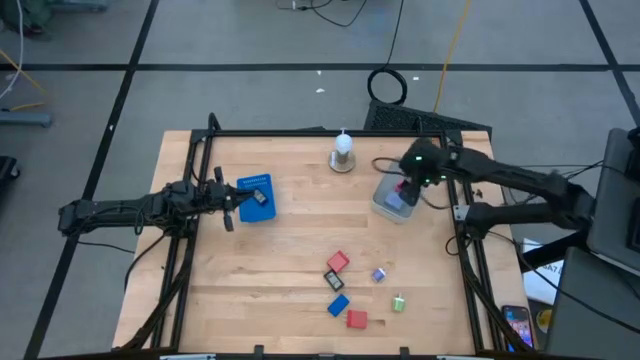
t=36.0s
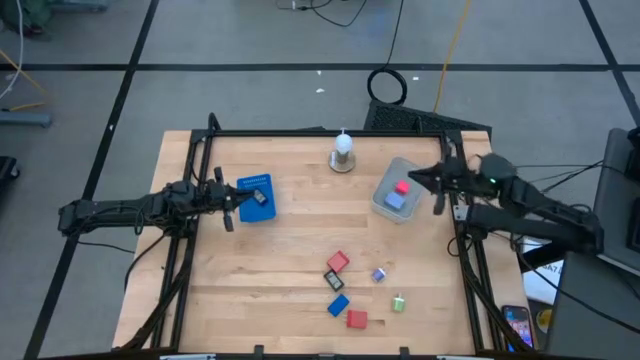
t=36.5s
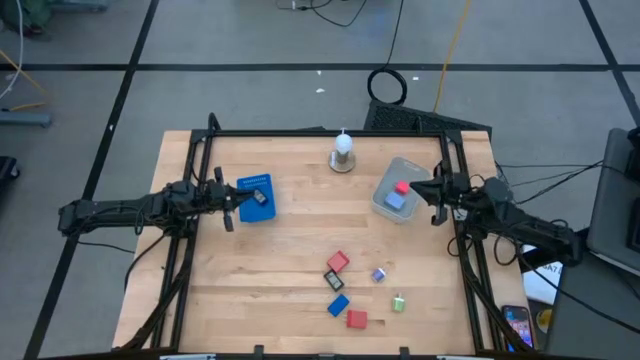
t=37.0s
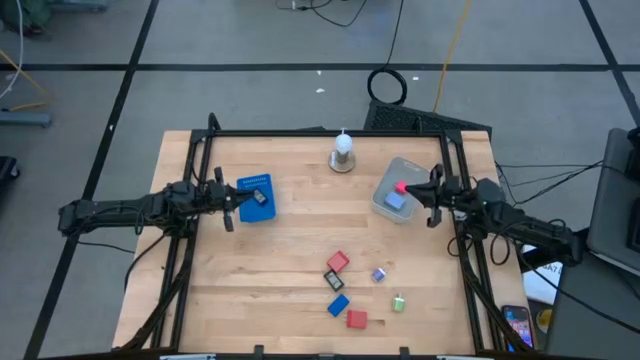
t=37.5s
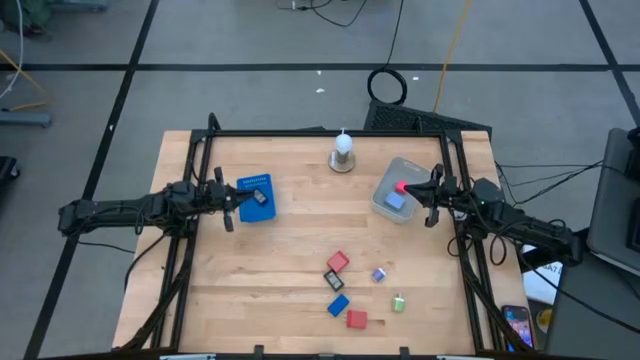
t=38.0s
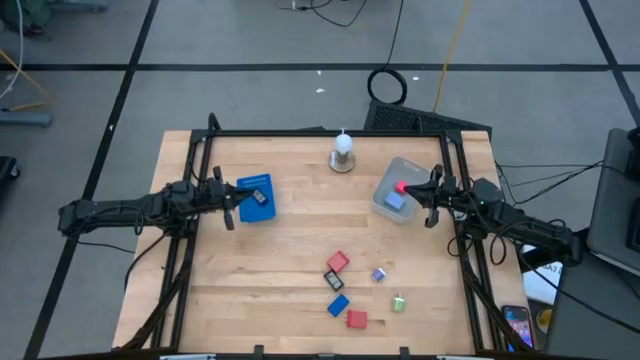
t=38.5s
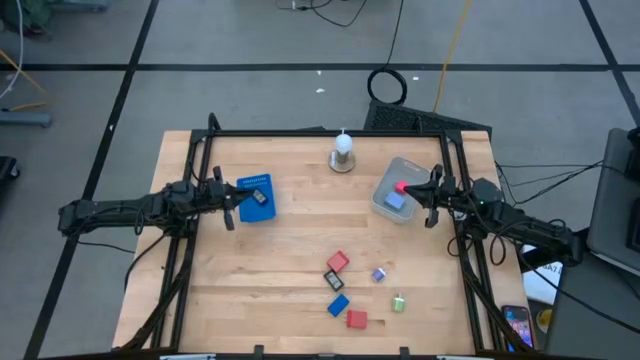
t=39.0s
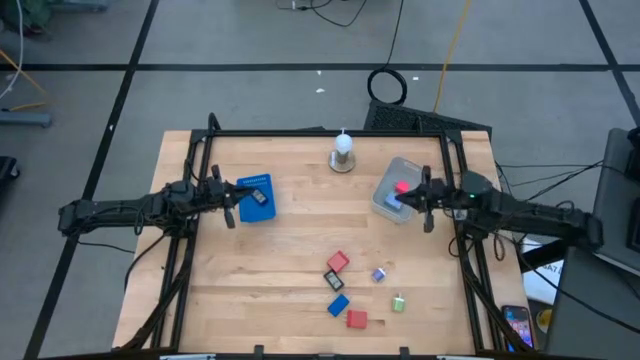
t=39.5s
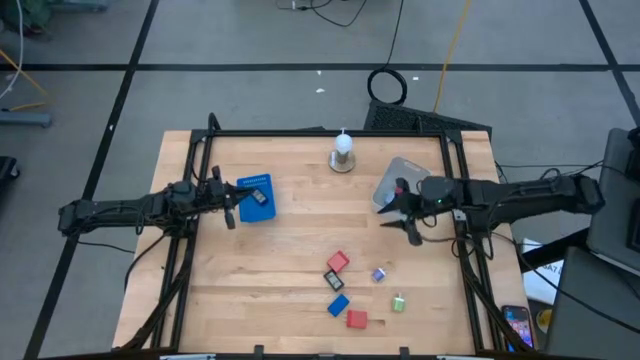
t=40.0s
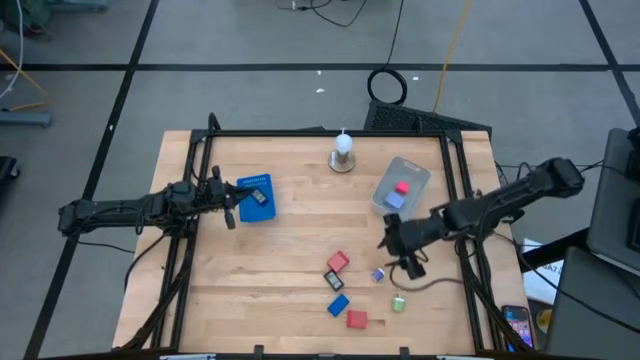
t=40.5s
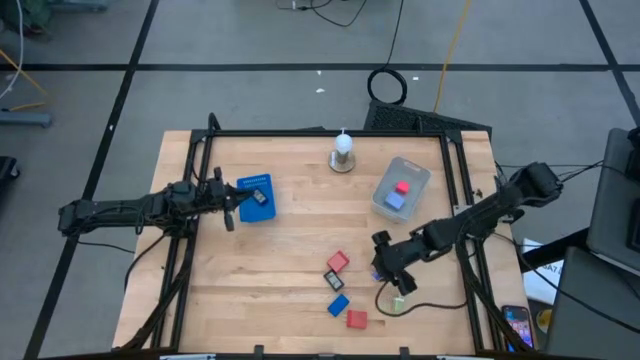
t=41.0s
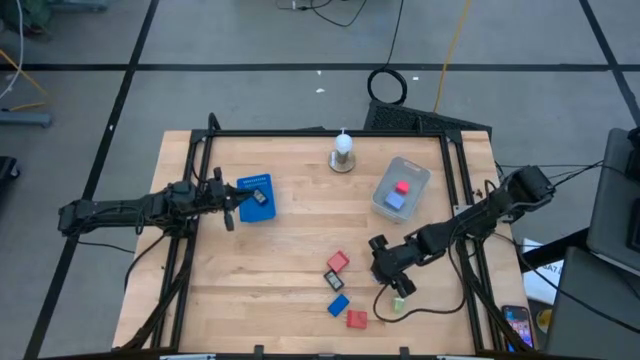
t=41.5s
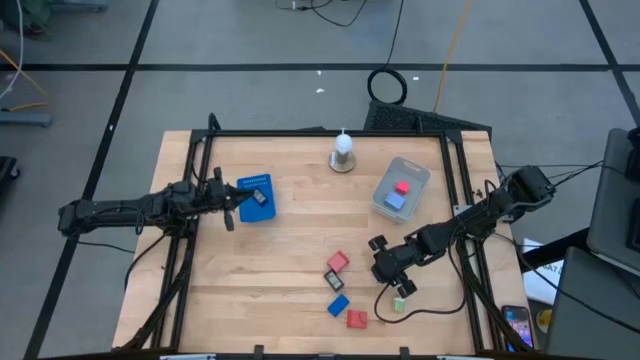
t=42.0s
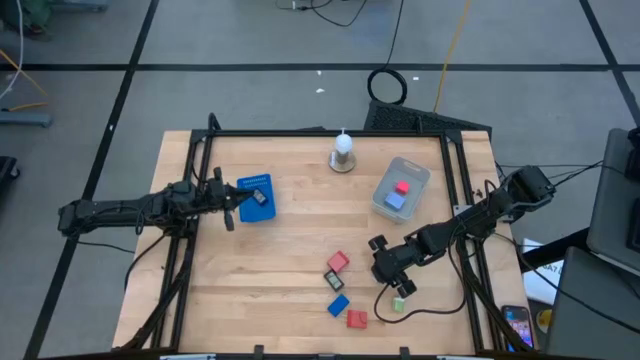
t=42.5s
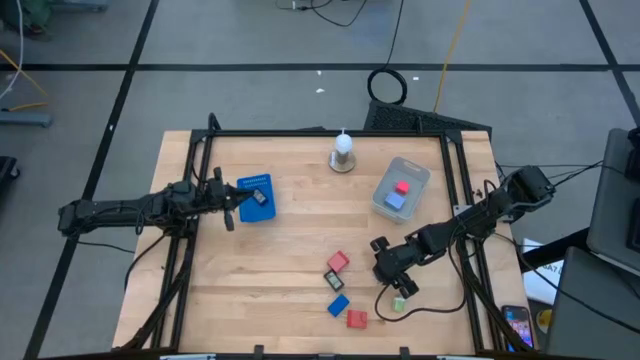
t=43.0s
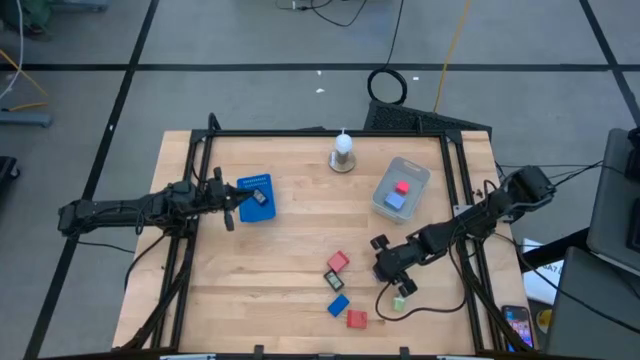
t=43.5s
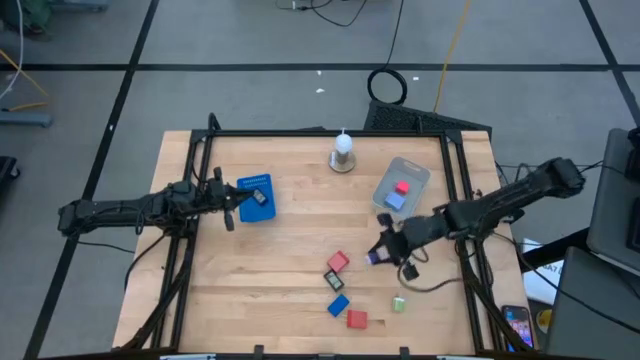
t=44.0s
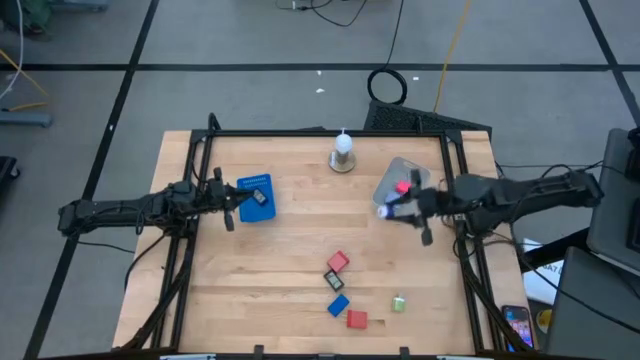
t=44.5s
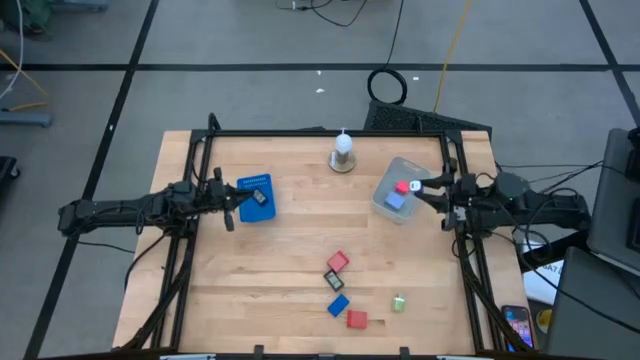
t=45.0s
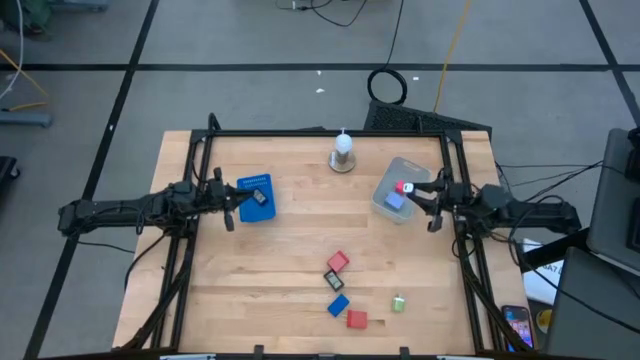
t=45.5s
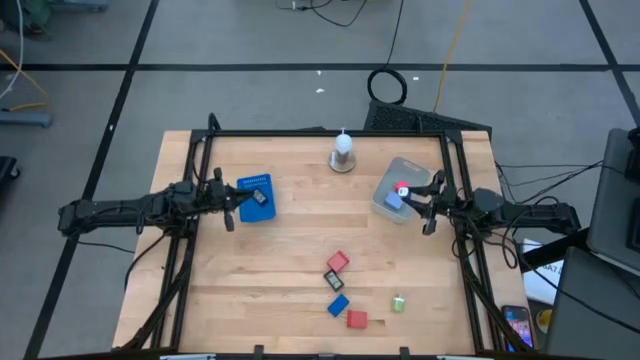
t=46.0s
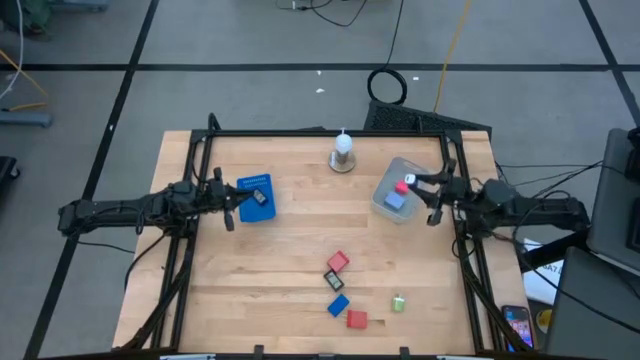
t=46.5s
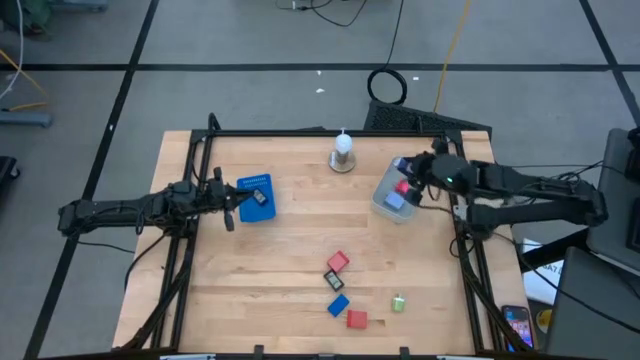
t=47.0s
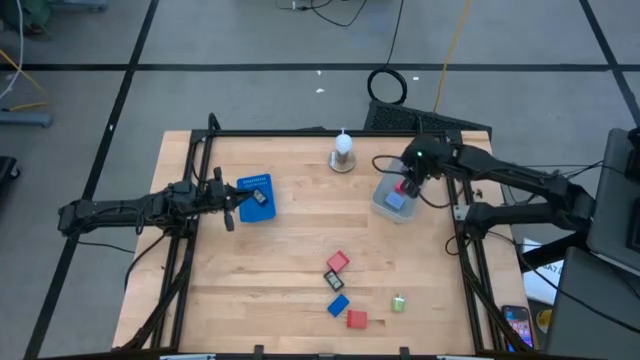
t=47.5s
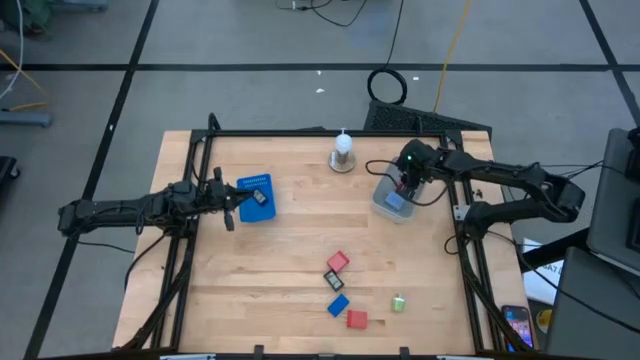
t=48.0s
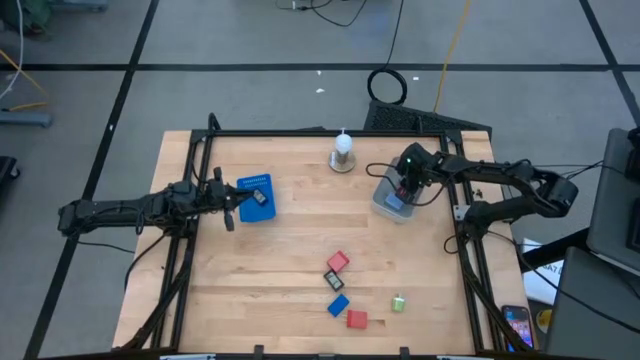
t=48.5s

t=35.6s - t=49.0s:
Task: Pick & Place Office items
Put the purple charger adapter into the gray bin

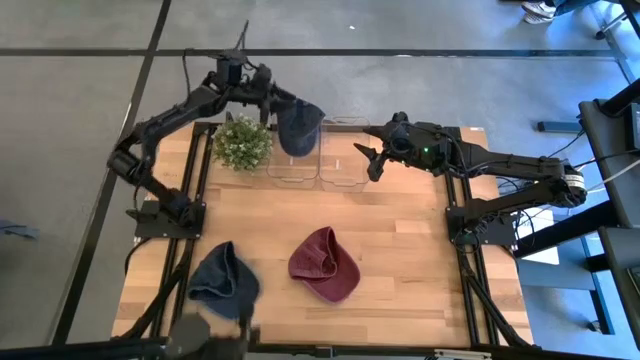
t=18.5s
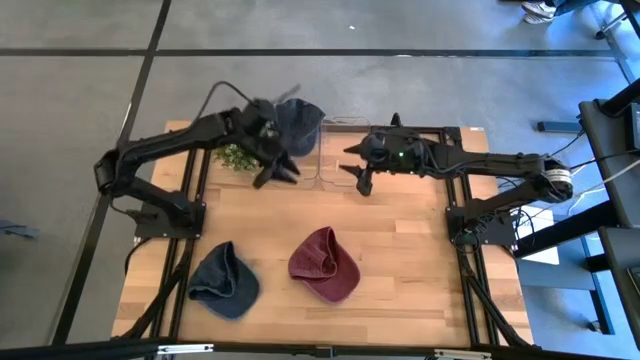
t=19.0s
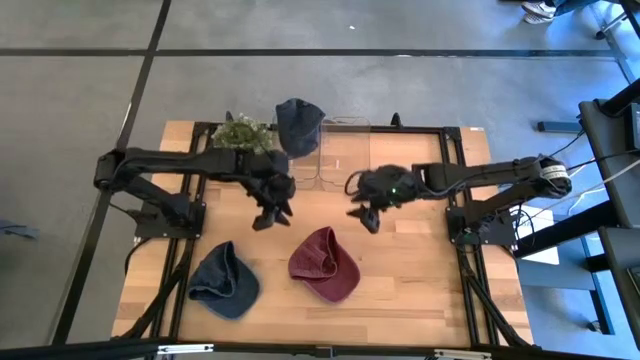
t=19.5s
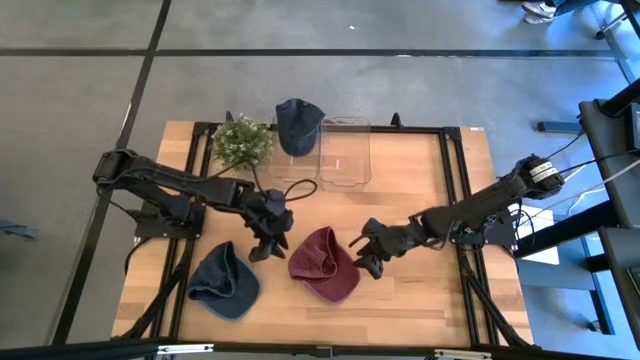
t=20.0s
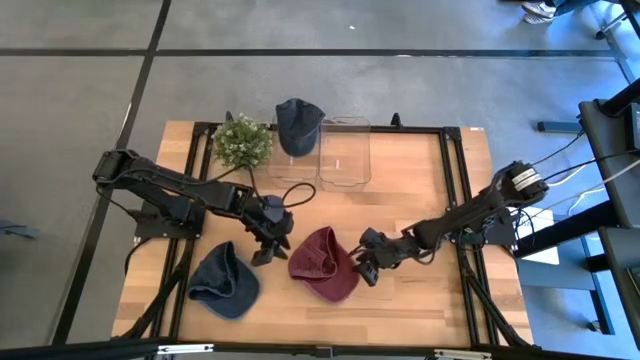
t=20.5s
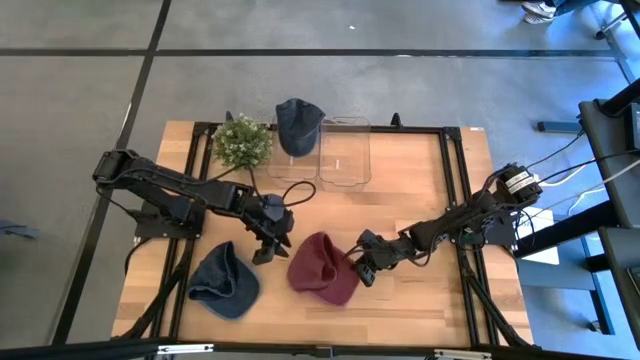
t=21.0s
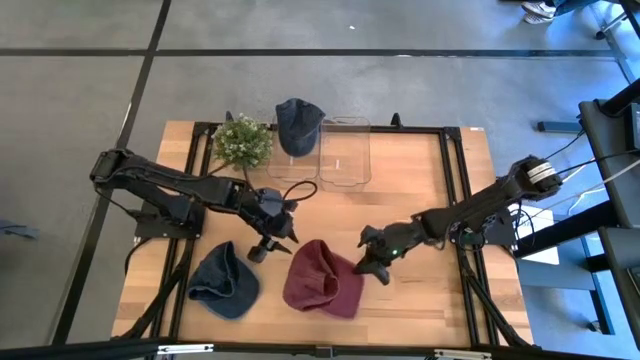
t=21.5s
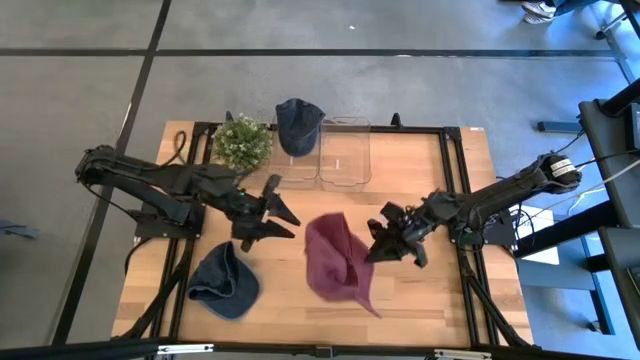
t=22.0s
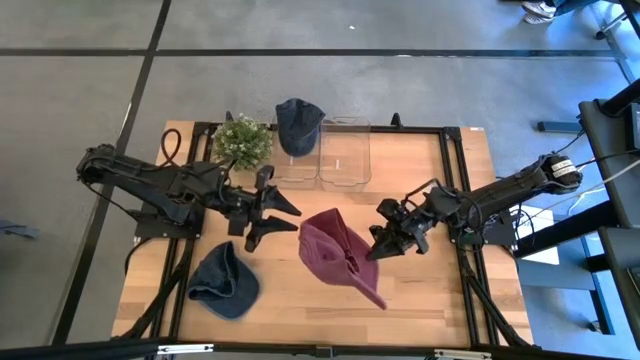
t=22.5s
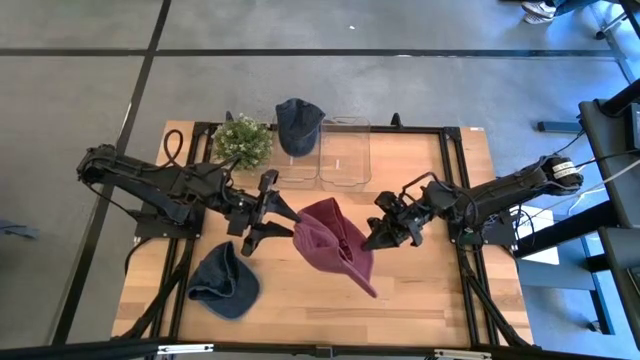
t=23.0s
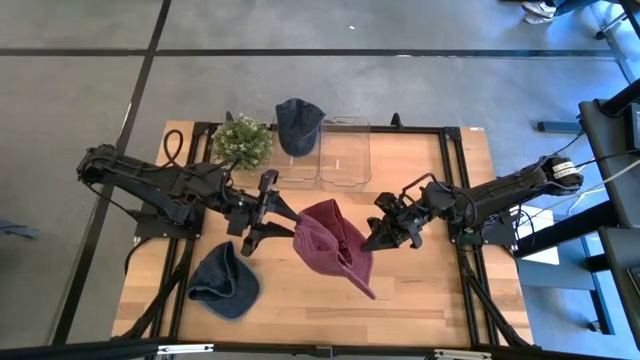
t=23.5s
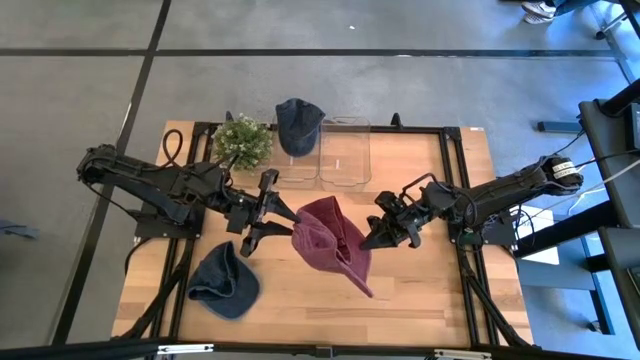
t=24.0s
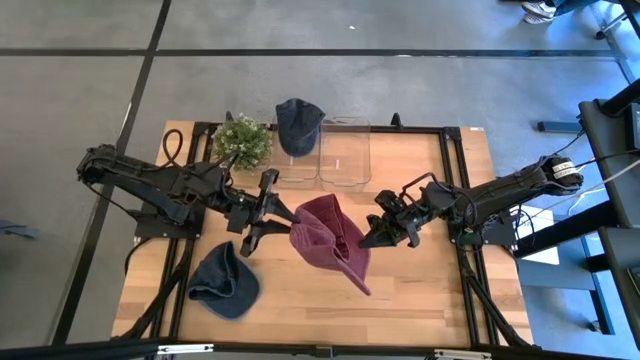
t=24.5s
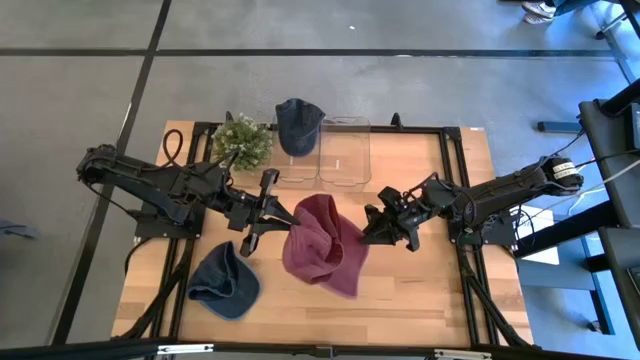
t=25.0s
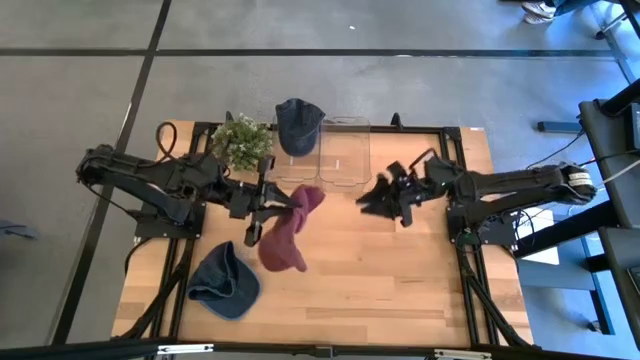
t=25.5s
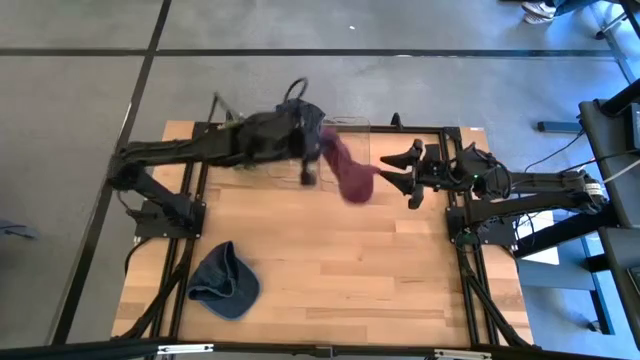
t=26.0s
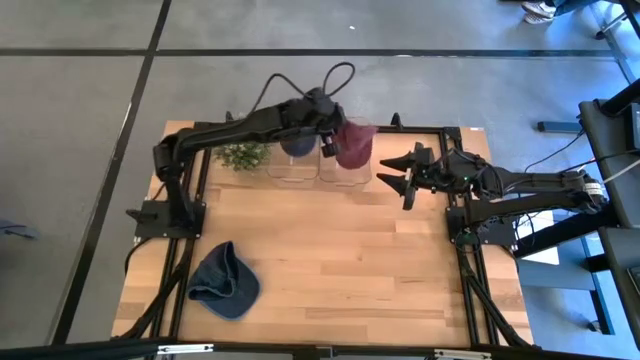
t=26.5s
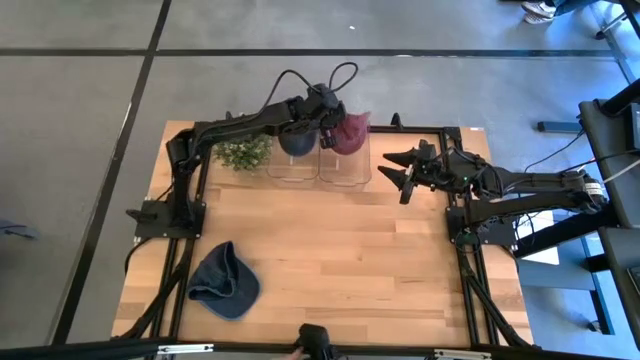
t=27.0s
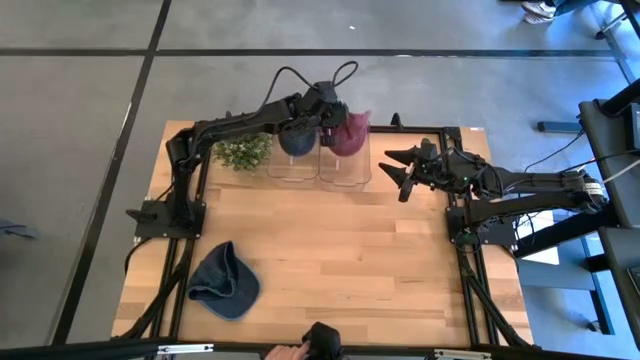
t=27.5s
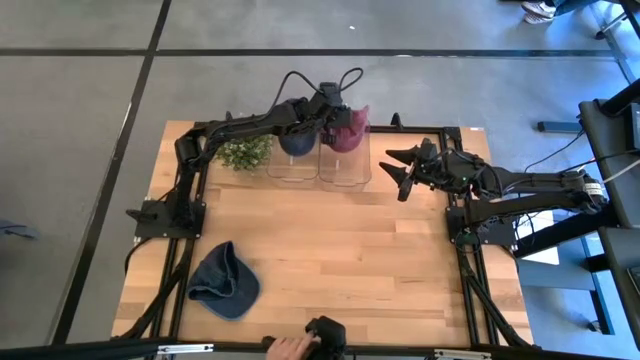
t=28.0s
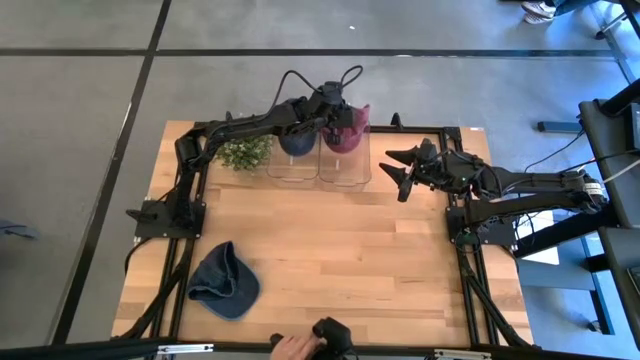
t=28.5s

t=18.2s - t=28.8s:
Task: Pick & Place hat
Put the red cap into the right transparent bin
